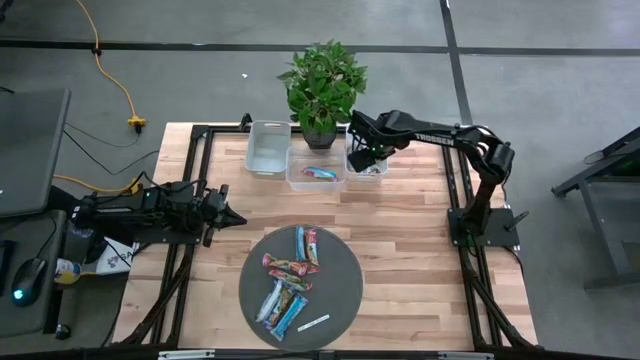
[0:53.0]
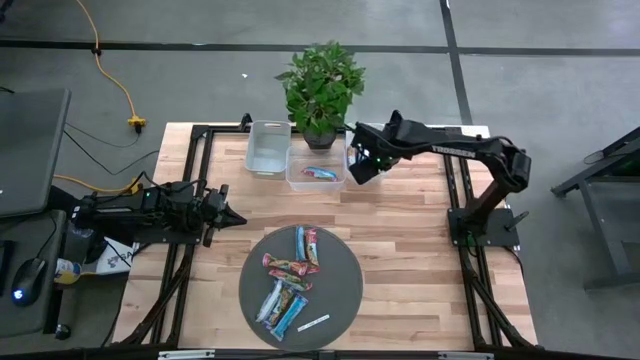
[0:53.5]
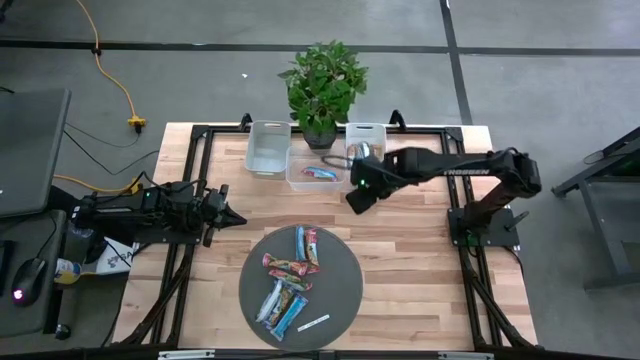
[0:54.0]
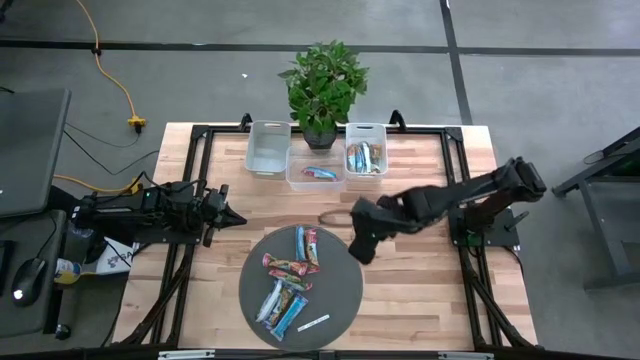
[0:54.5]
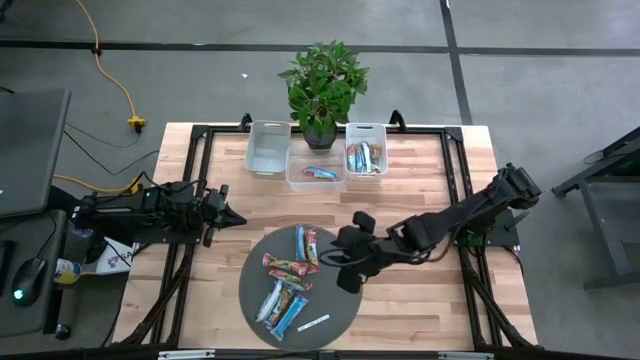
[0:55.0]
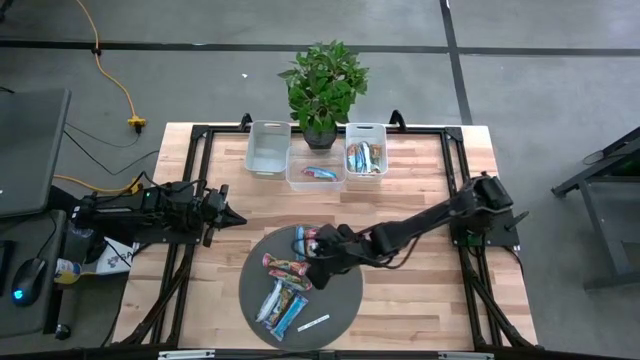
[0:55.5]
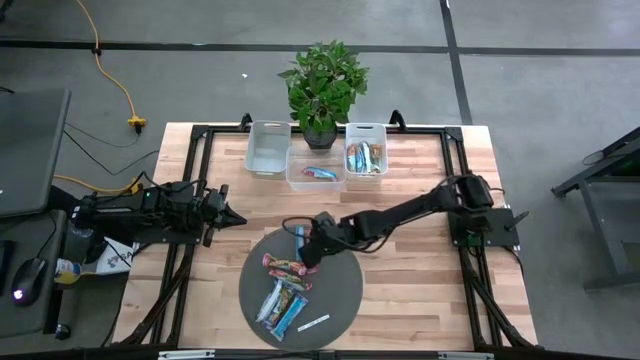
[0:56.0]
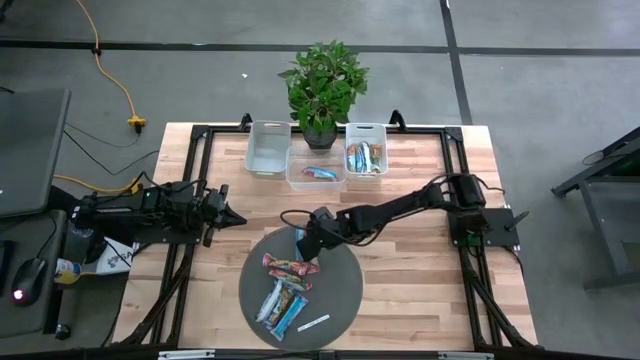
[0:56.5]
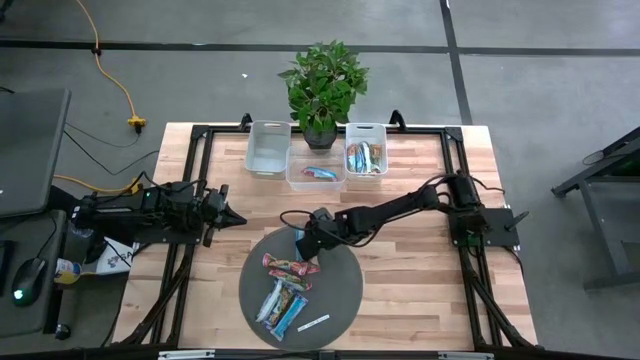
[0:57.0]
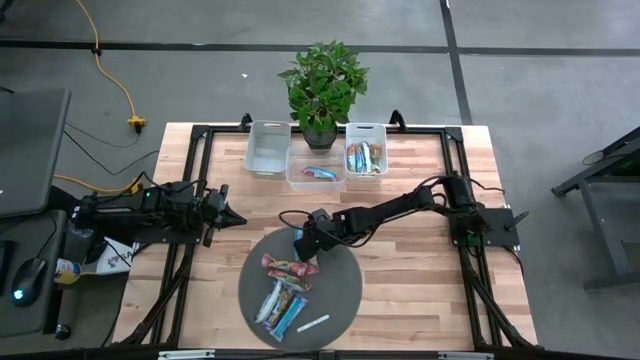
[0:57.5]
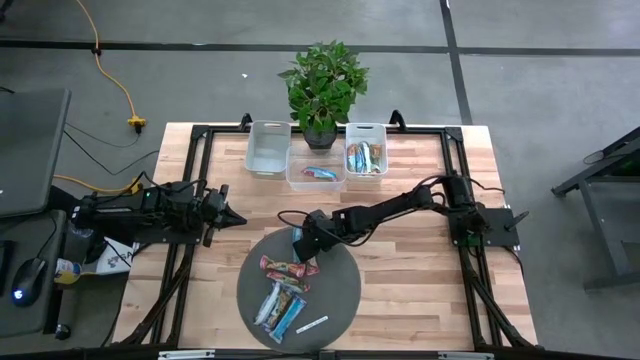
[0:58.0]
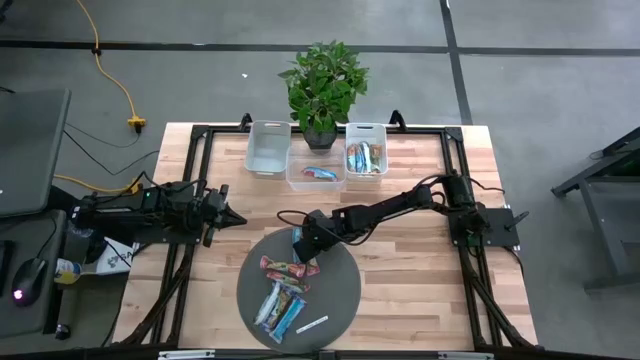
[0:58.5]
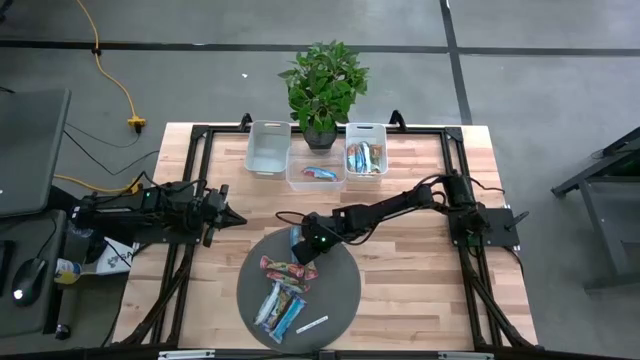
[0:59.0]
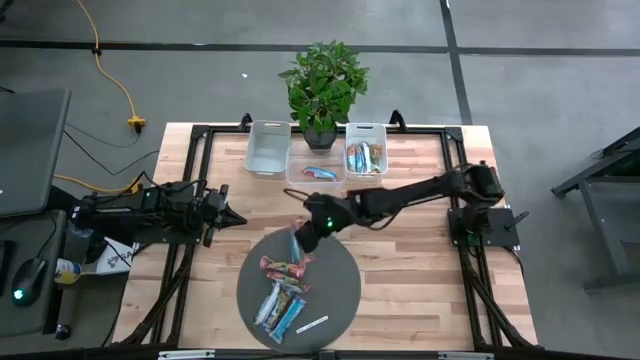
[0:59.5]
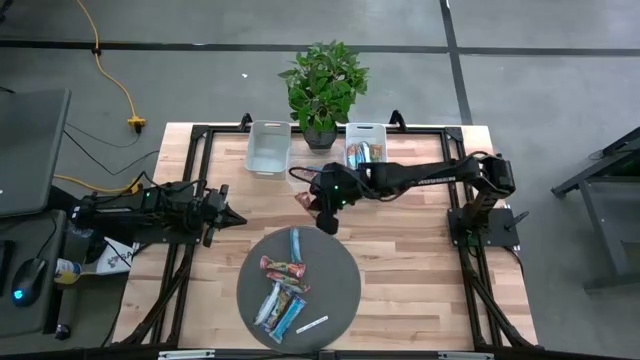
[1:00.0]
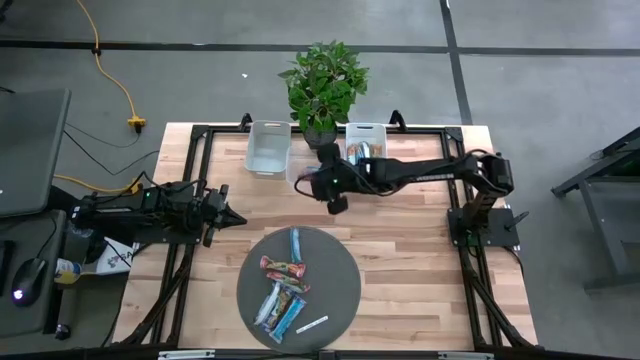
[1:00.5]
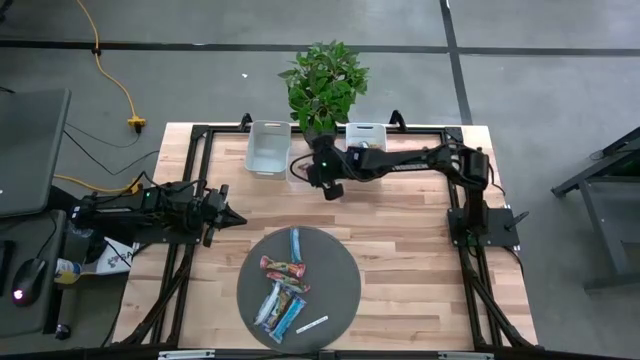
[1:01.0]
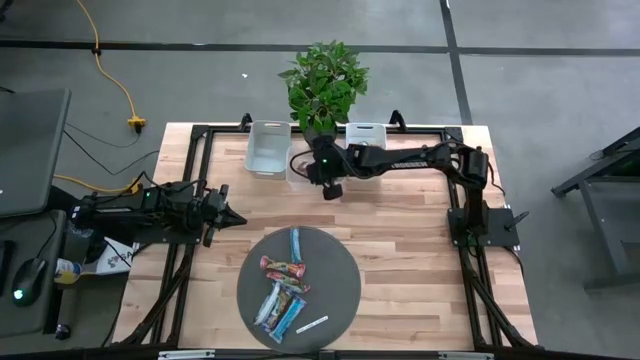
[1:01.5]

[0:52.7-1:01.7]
Task: Pick and place Granola Bars by type
Put the red granola bar into the transparent bin

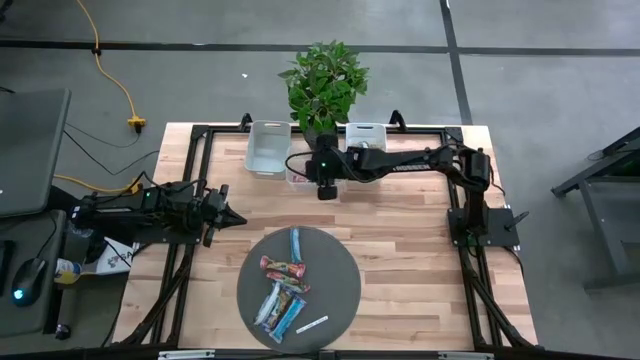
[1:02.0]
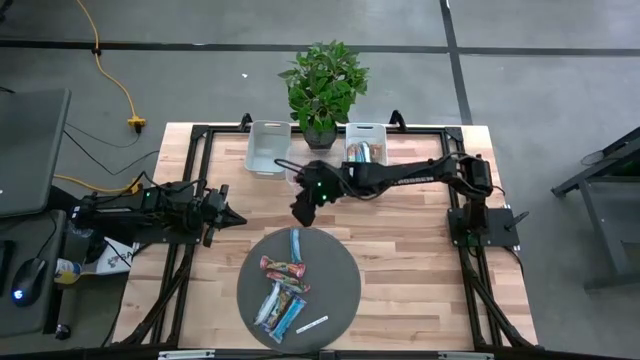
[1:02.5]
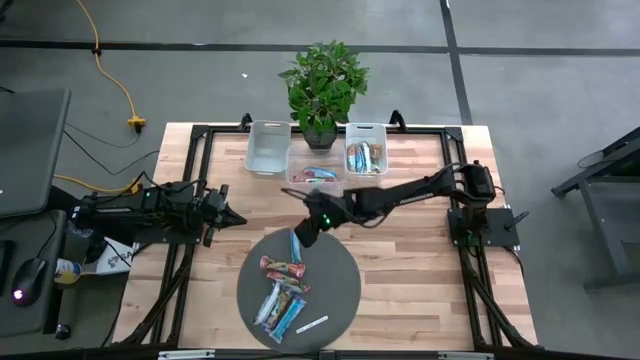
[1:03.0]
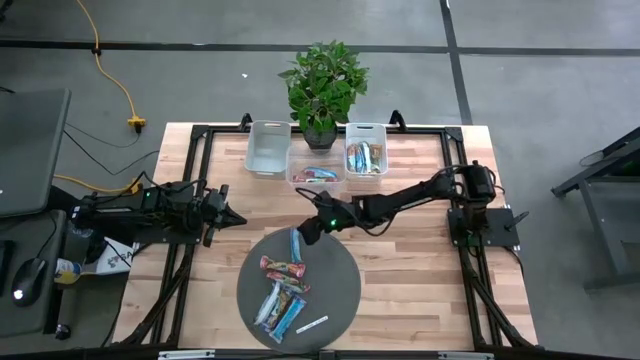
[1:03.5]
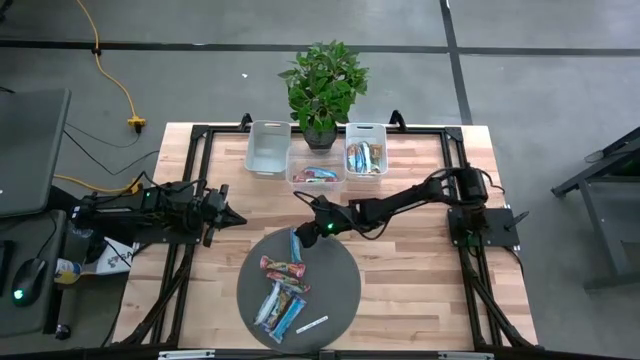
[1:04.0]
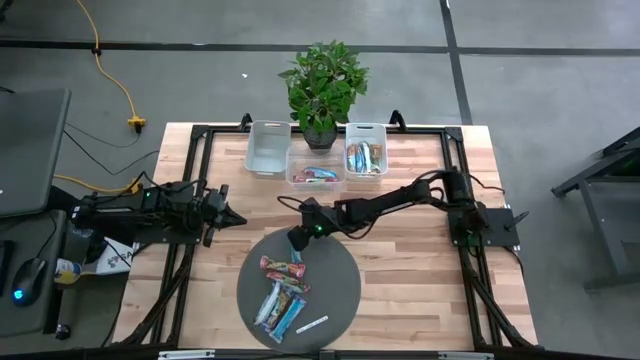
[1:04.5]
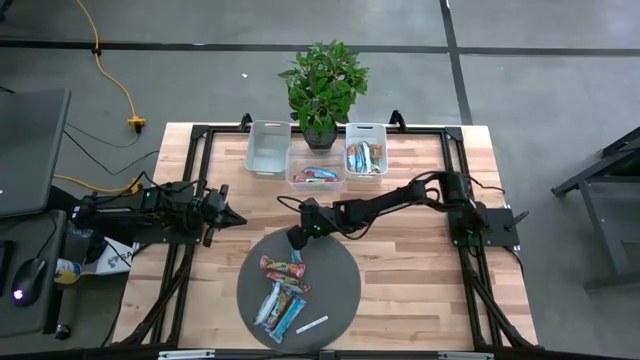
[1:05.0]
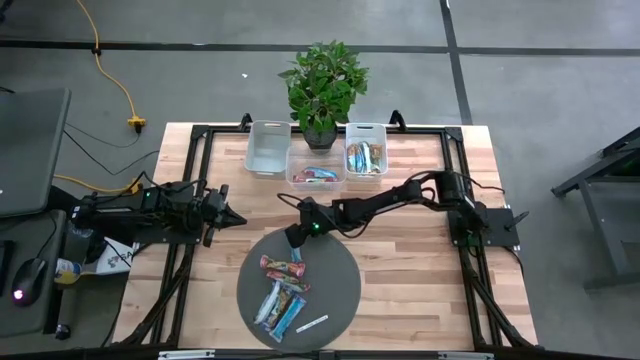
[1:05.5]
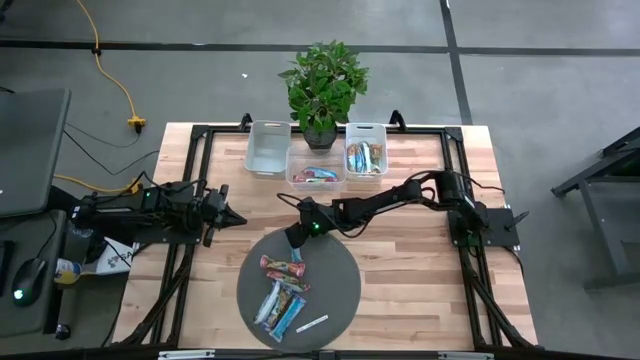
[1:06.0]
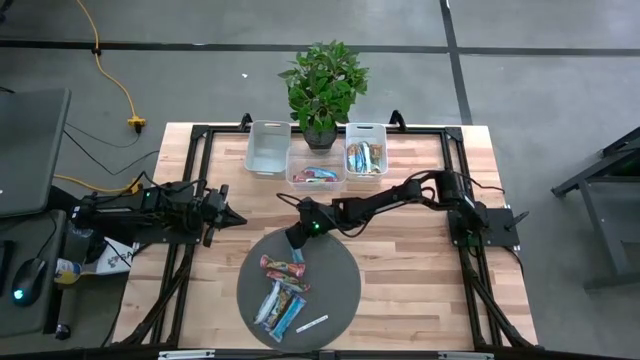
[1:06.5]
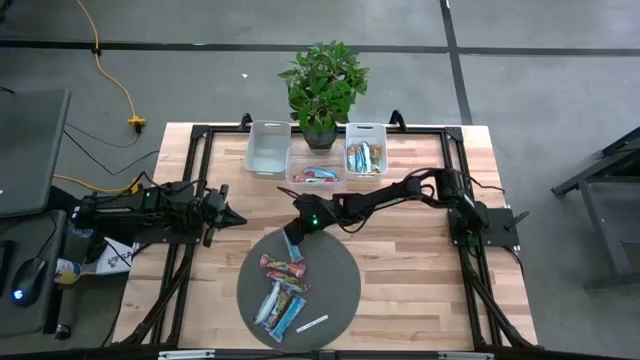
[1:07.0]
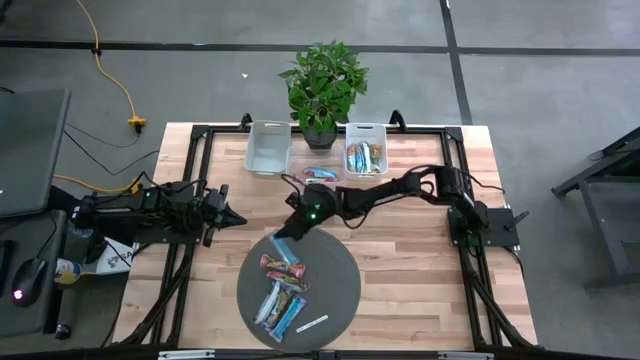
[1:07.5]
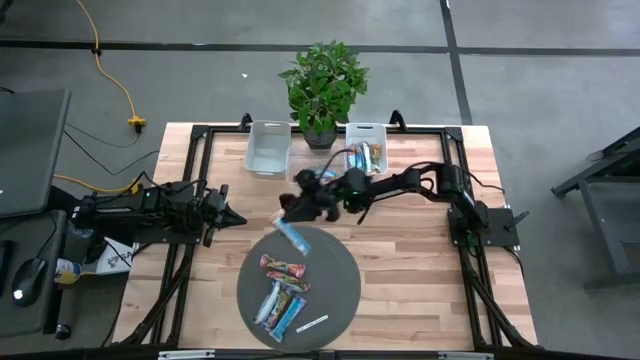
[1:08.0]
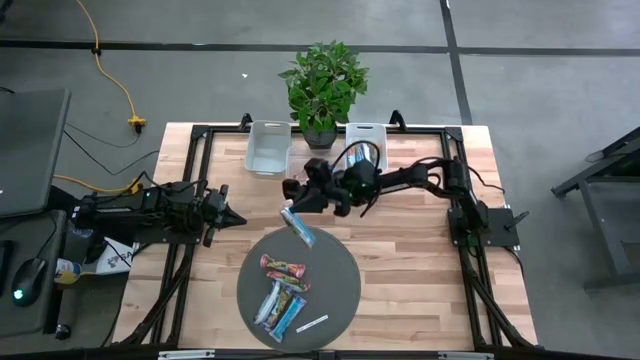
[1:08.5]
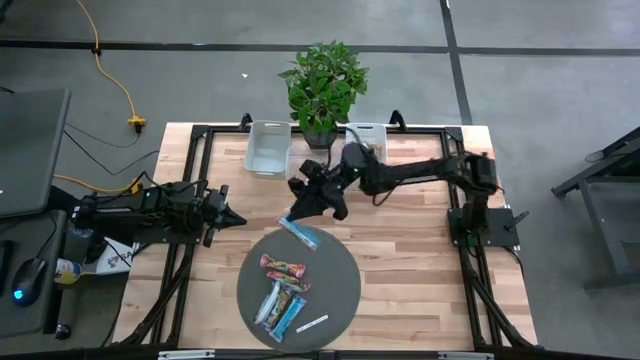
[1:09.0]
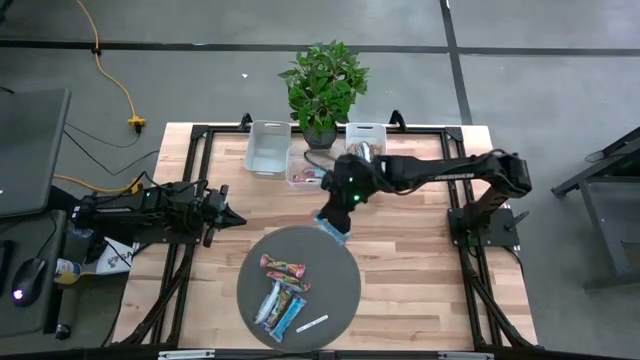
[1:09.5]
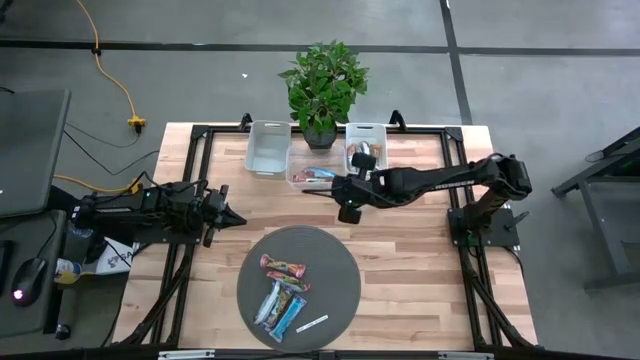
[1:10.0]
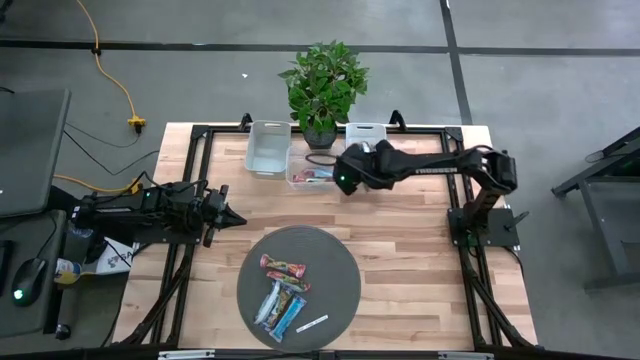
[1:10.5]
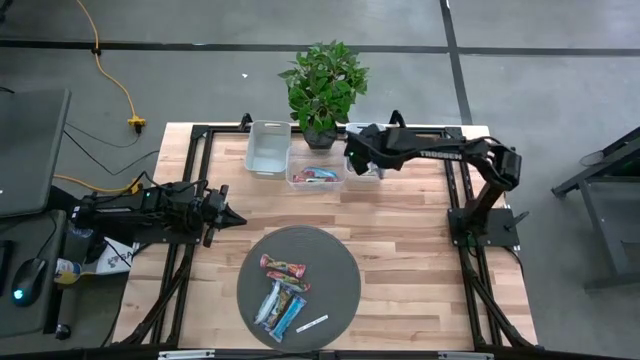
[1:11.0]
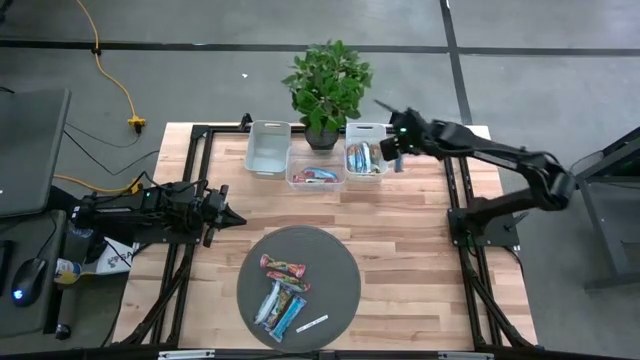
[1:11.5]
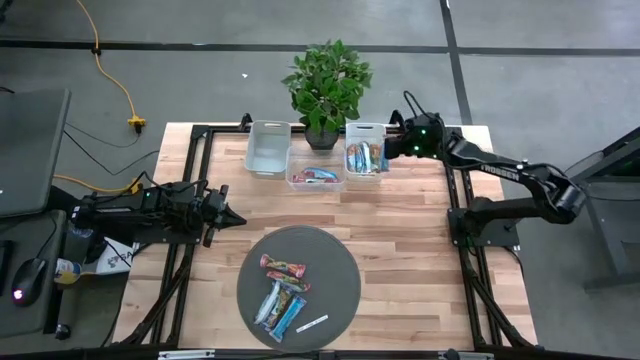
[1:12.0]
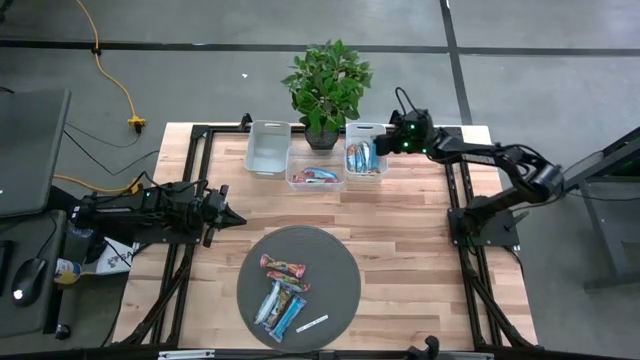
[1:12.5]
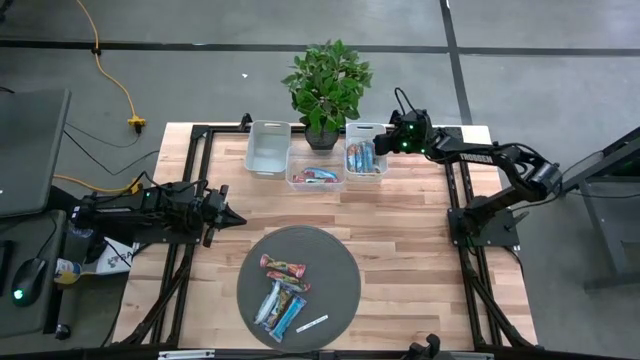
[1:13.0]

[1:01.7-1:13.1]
Put the yellow granola bar into the white bin
